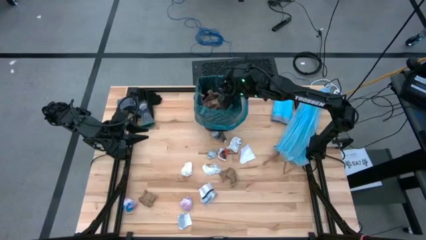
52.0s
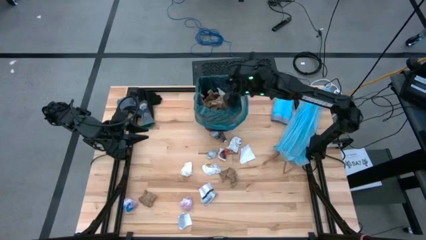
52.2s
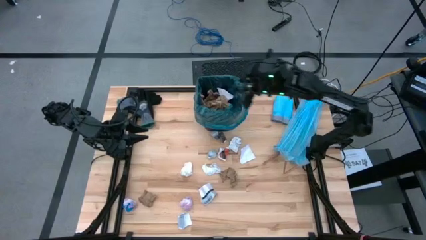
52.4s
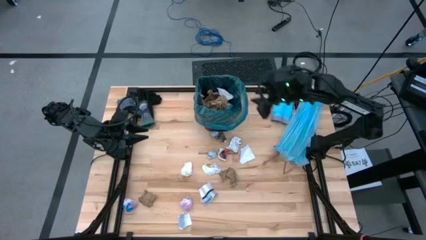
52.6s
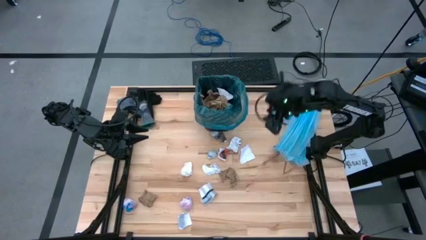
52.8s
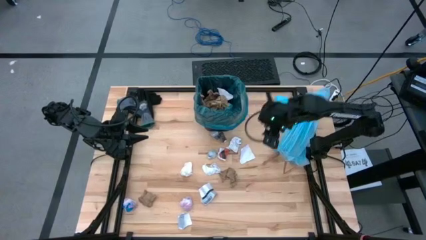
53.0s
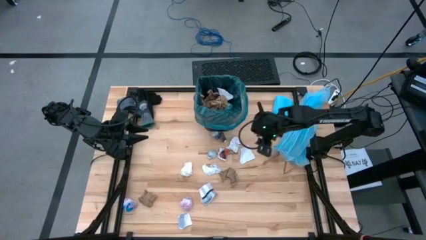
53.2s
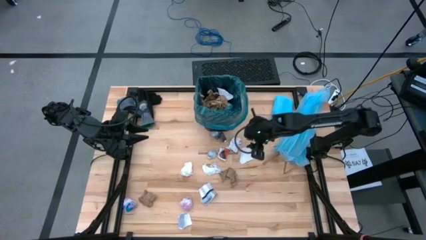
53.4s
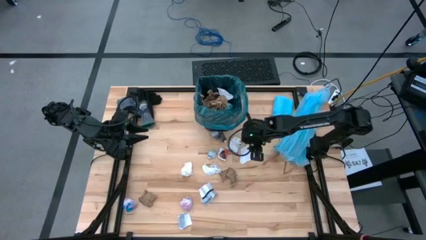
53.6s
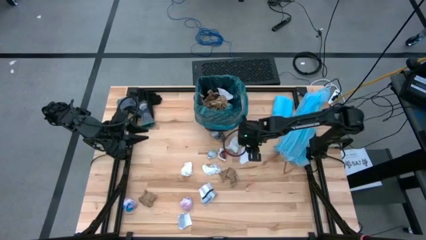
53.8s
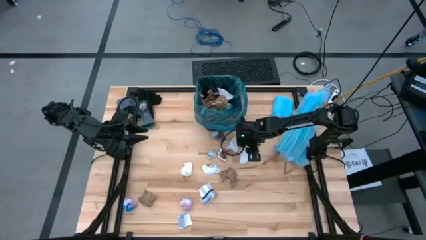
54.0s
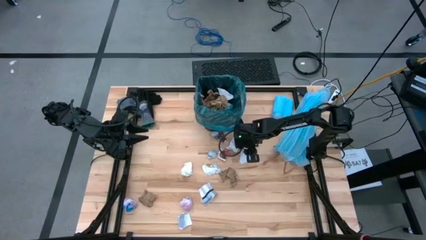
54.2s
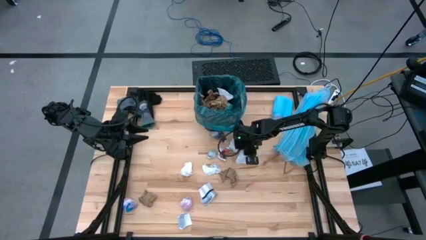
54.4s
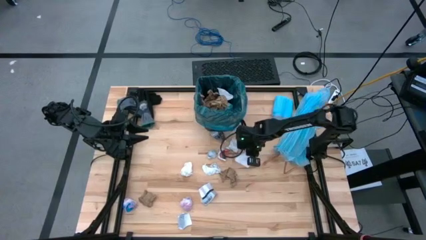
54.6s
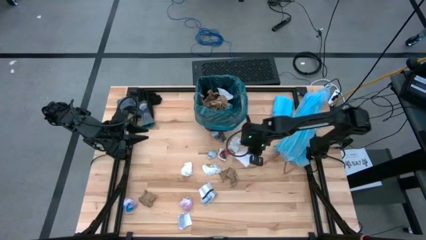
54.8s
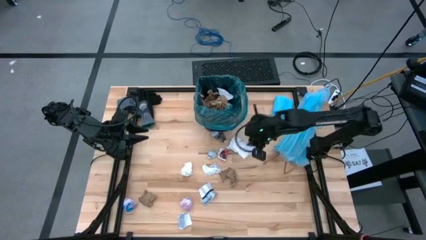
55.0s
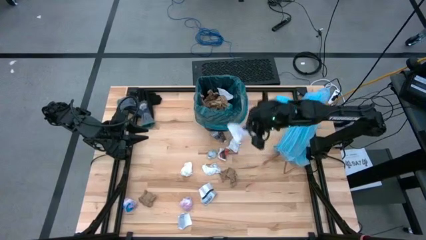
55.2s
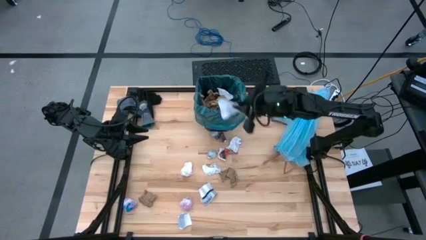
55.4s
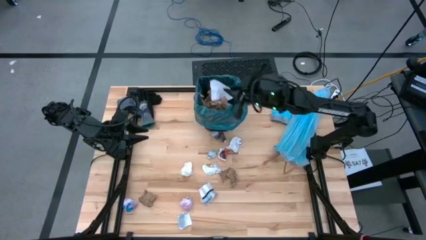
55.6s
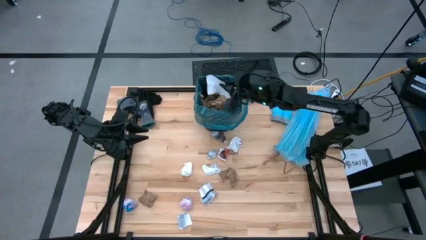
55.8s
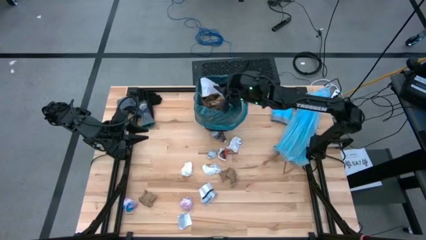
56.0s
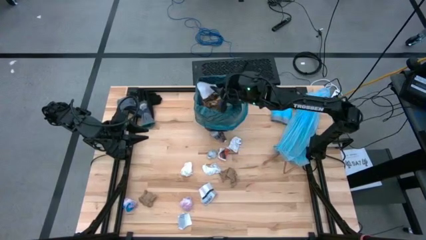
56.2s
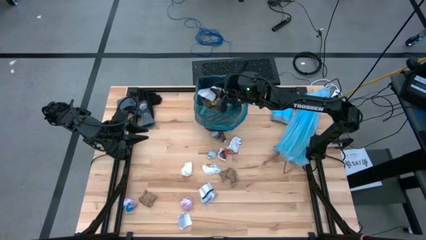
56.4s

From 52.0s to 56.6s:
Task: place trash/remove bag and relplace
Put the white paper into the trash bin

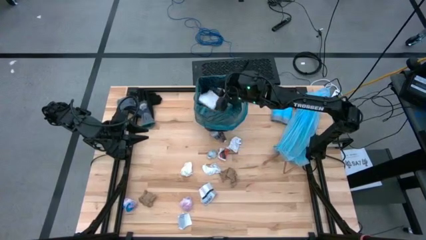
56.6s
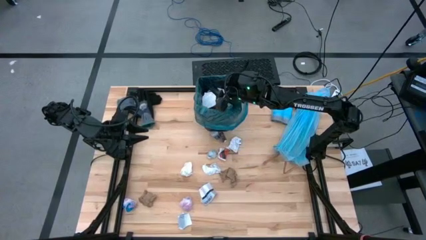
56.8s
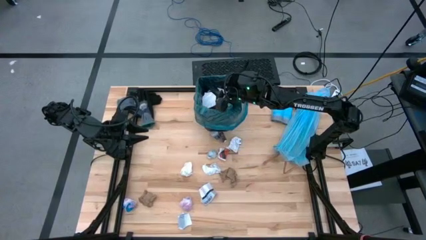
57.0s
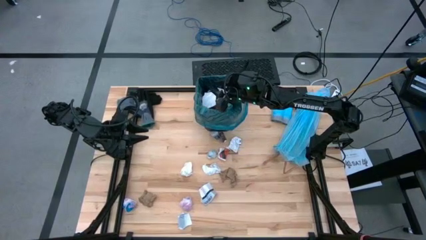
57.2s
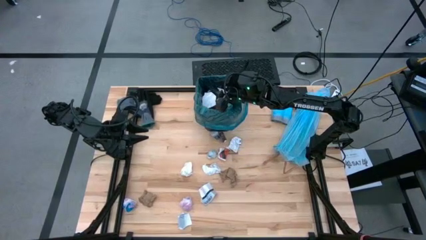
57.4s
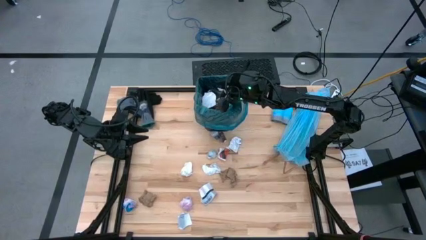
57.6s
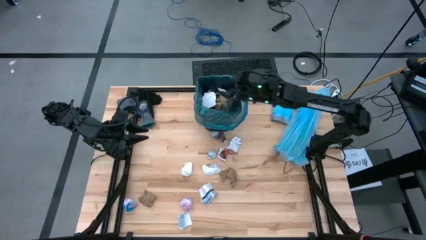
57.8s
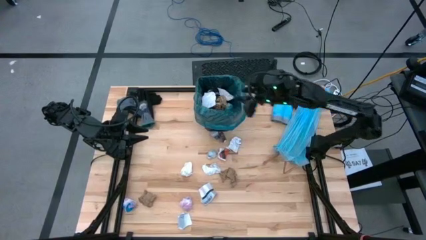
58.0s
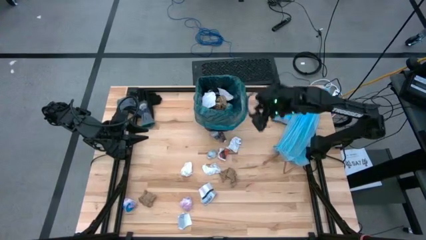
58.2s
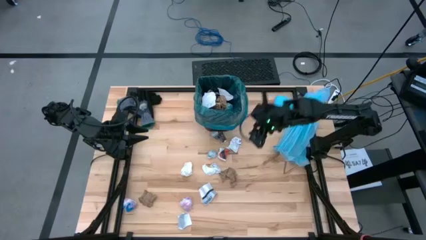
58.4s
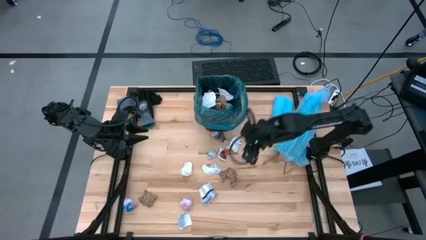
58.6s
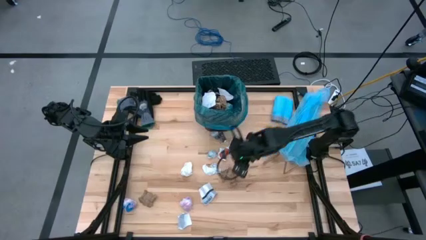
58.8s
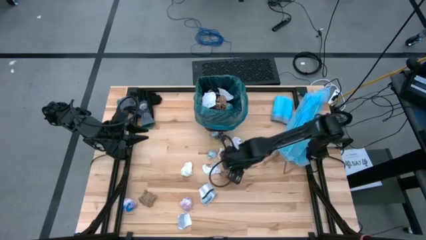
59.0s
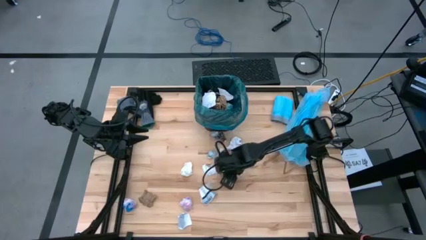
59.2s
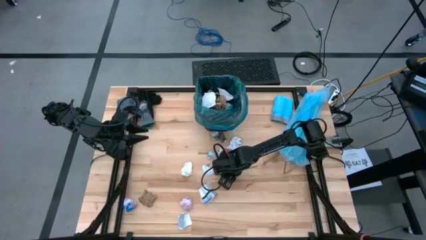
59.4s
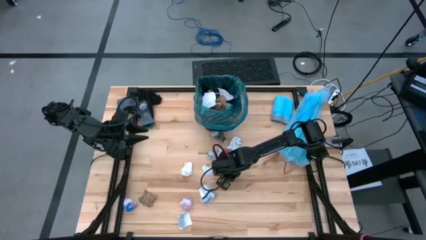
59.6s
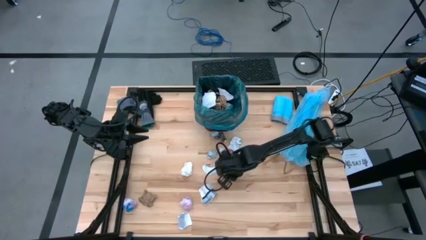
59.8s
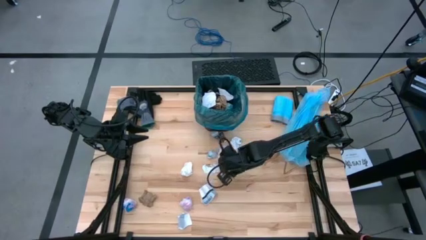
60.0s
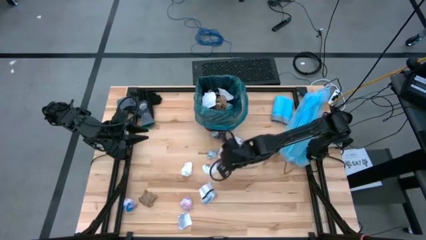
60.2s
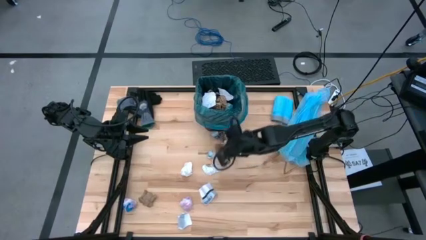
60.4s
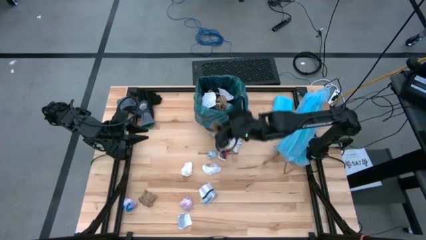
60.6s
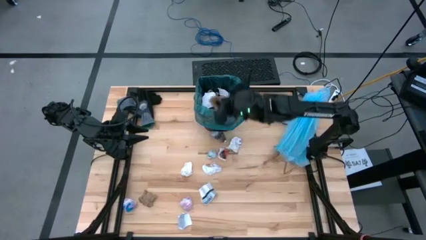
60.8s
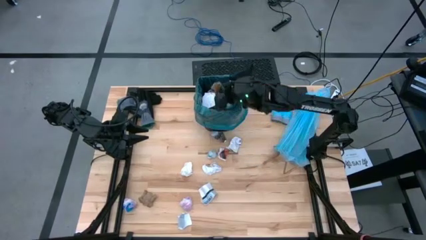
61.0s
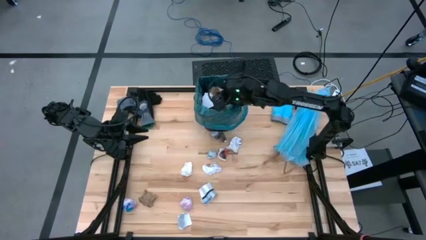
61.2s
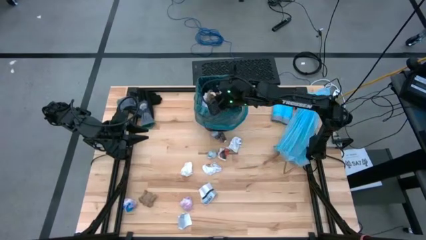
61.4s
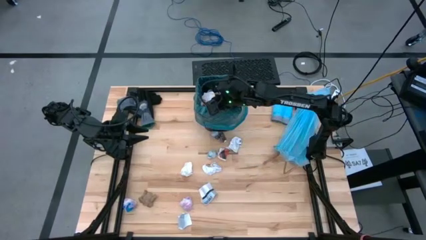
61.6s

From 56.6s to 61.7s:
Put the brown napkin into the trash bin

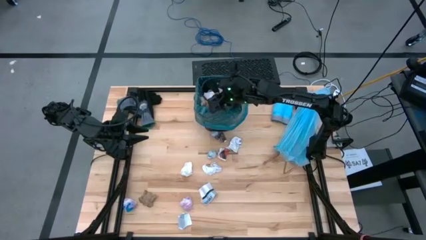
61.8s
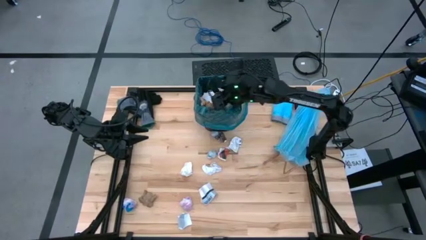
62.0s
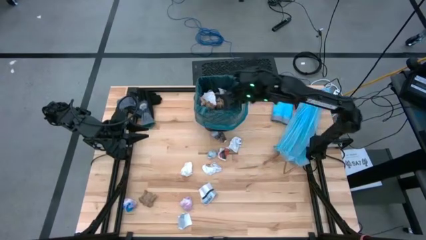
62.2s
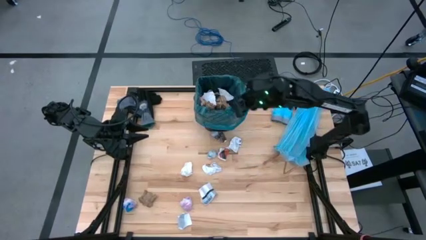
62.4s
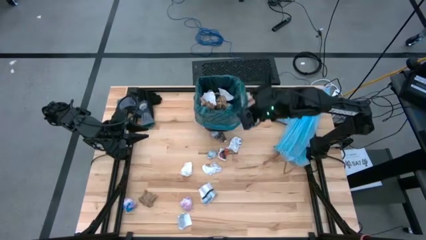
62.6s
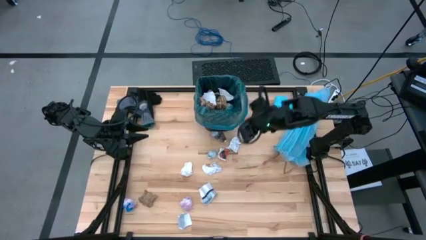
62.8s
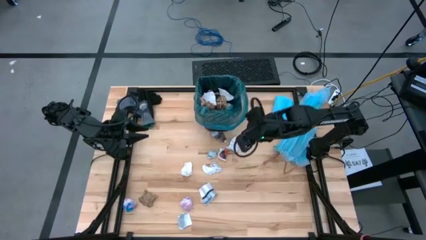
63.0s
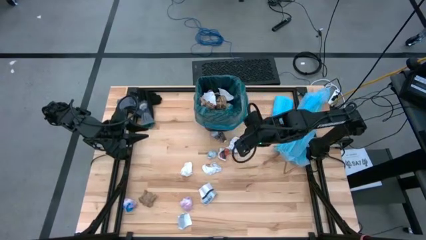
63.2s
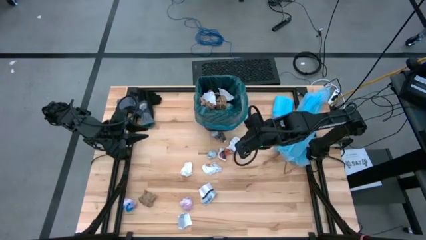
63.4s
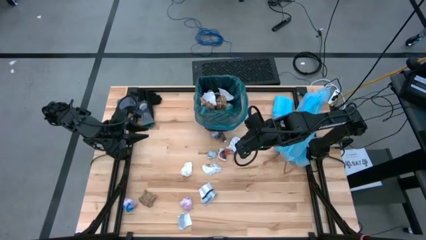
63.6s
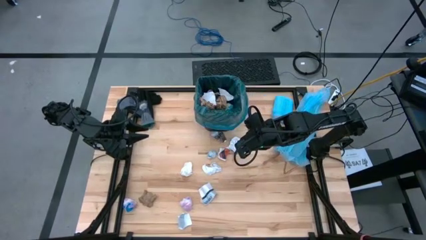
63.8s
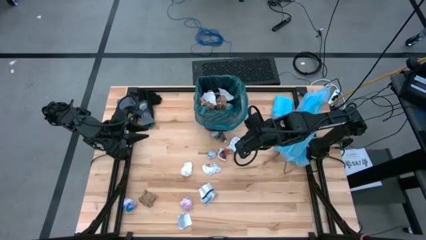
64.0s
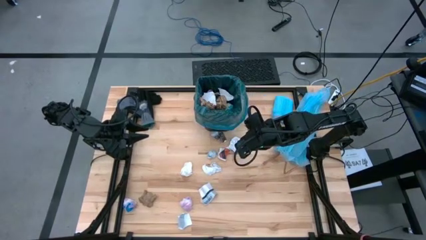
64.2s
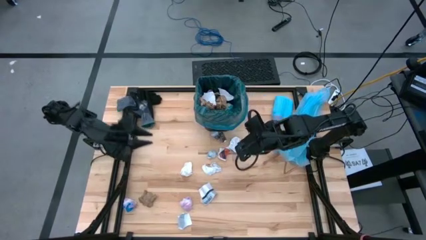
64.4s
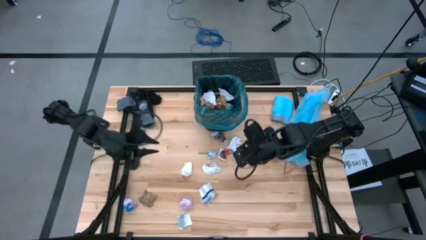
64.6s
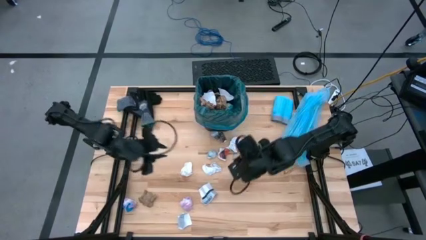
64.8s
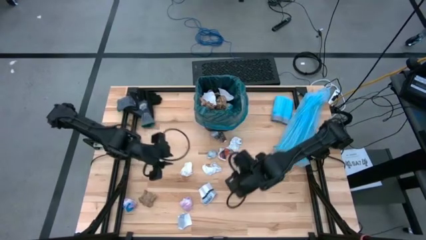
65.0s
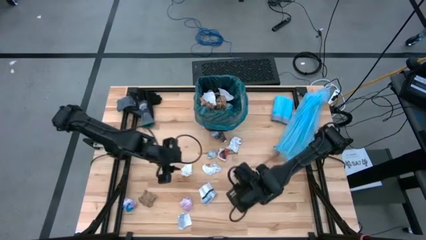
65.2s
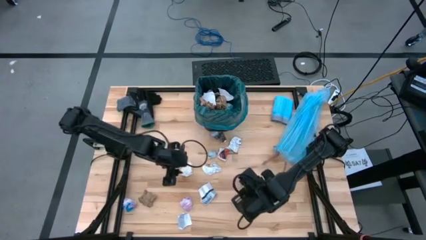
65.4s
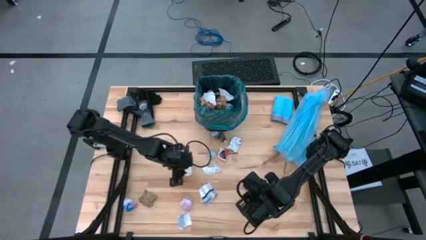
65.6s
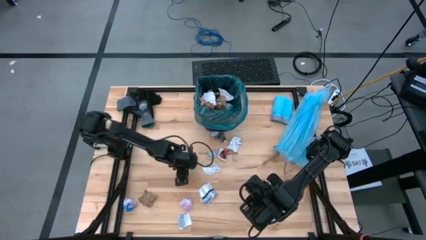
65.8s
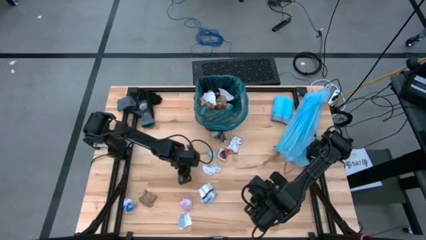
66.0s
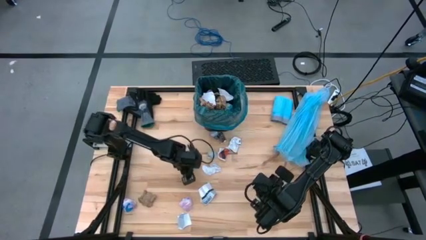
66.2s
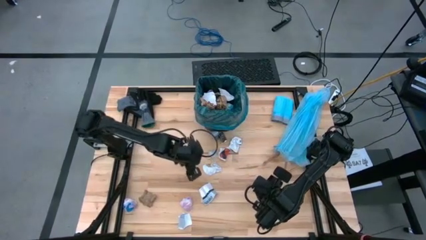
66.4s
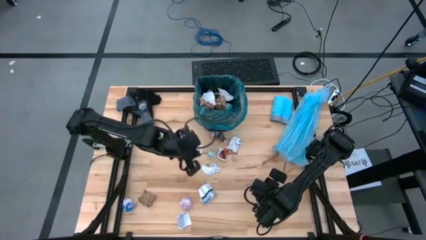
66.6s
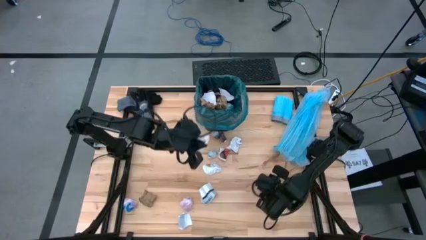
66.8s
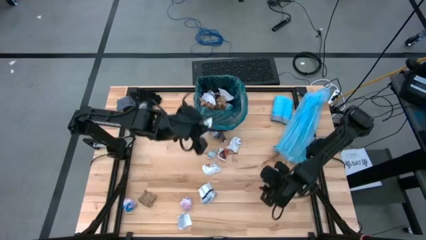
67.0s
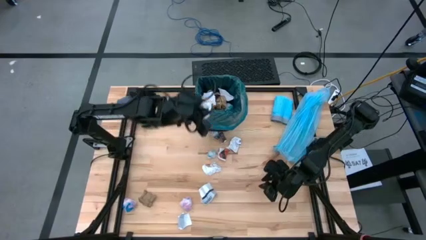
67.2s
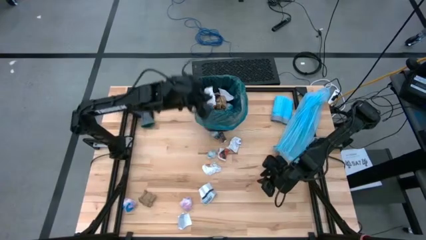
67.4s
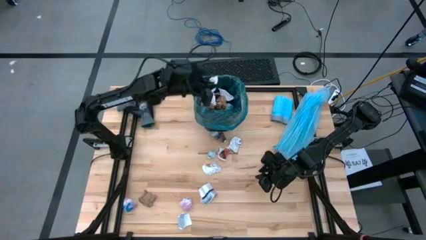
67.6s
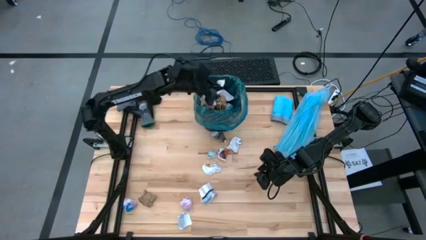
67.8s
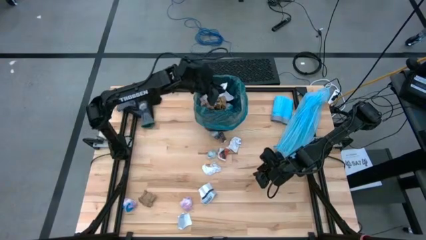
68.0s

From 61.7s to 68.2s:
Put the white napkin into the trash bin
